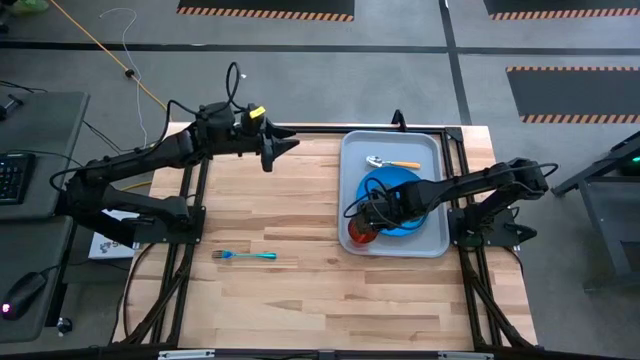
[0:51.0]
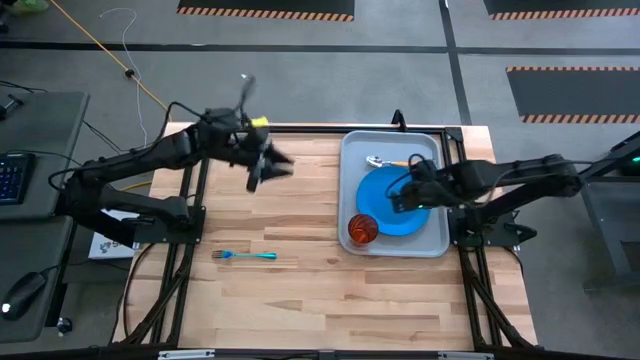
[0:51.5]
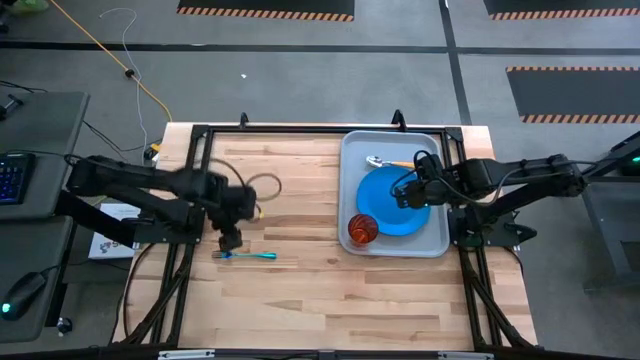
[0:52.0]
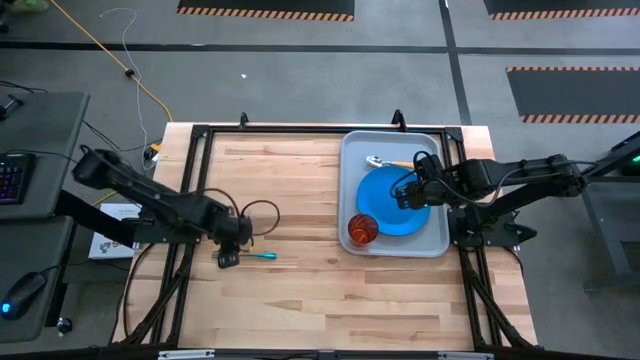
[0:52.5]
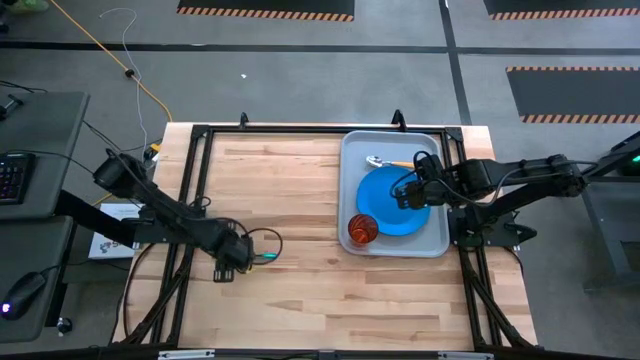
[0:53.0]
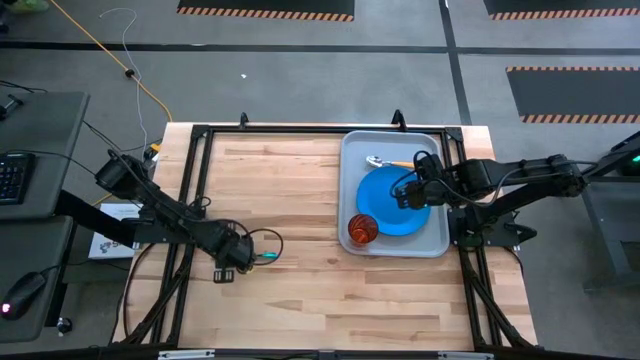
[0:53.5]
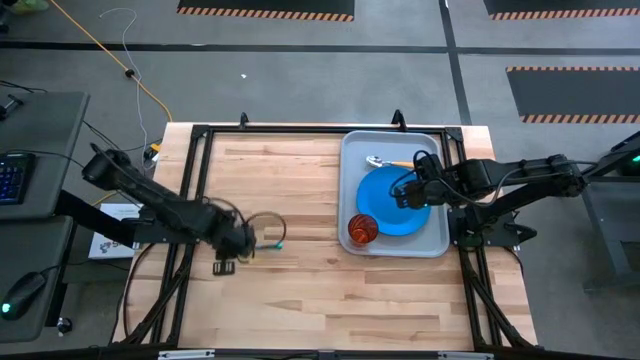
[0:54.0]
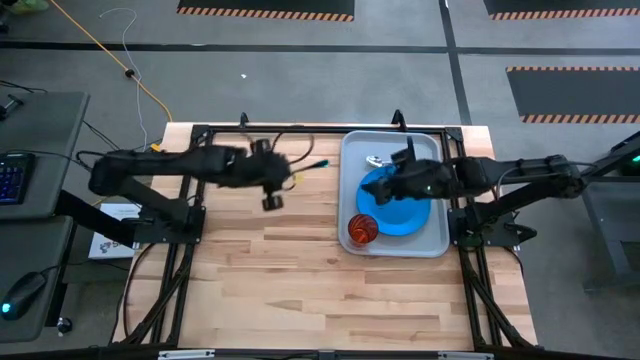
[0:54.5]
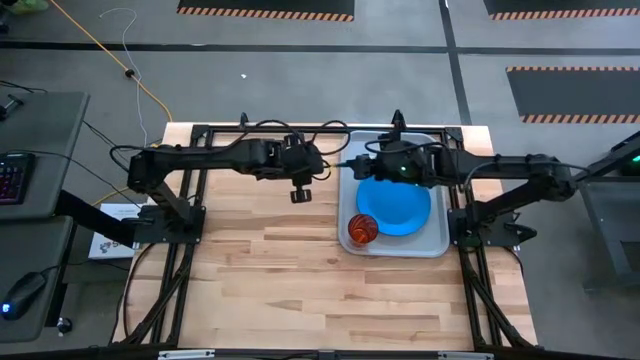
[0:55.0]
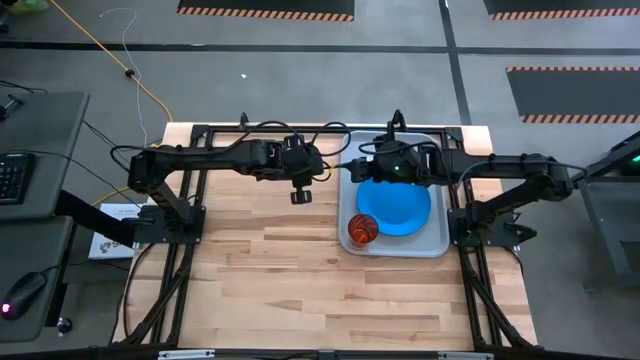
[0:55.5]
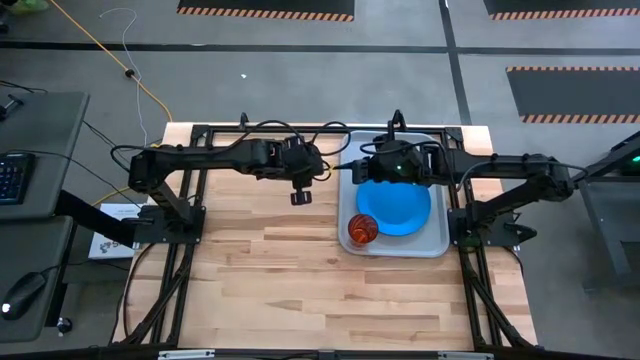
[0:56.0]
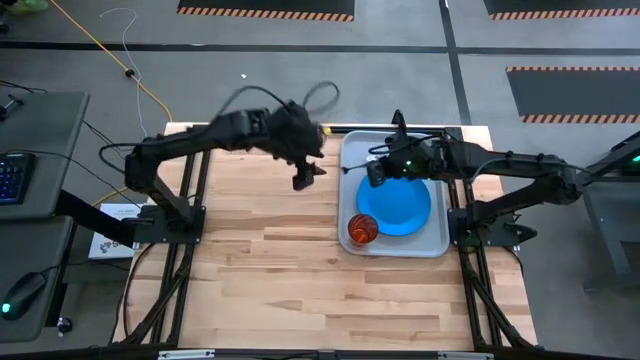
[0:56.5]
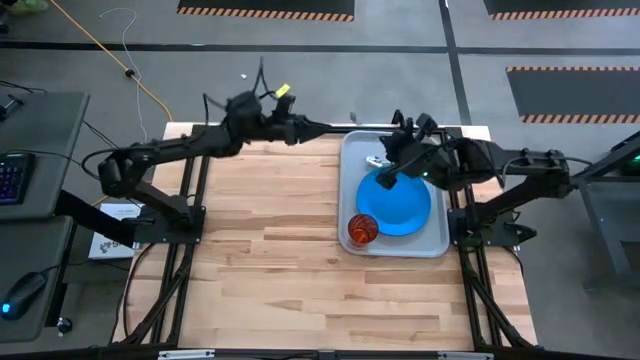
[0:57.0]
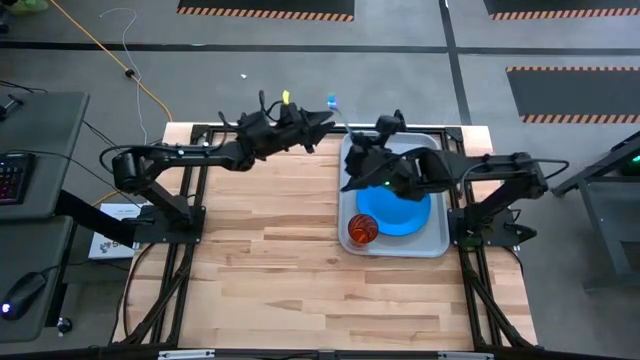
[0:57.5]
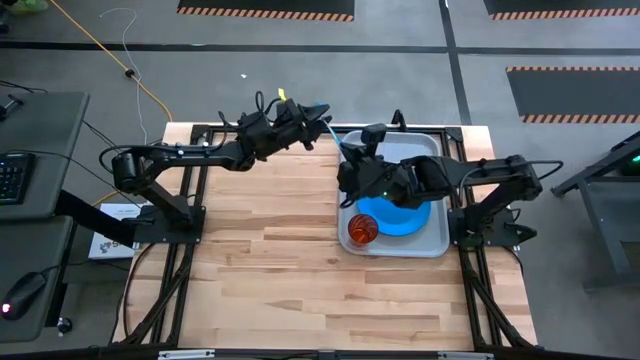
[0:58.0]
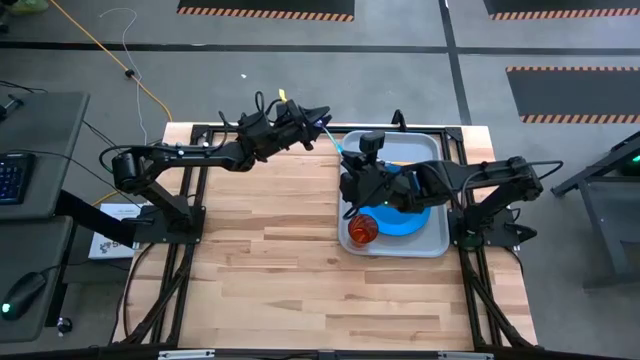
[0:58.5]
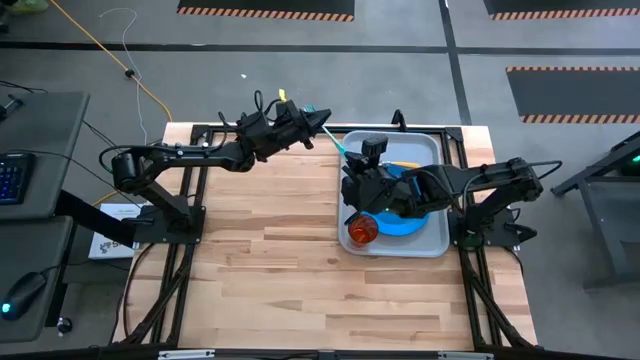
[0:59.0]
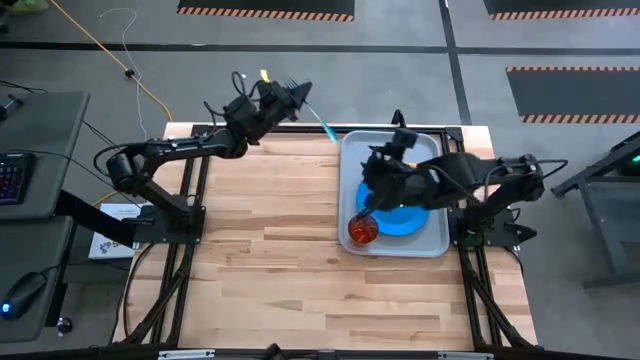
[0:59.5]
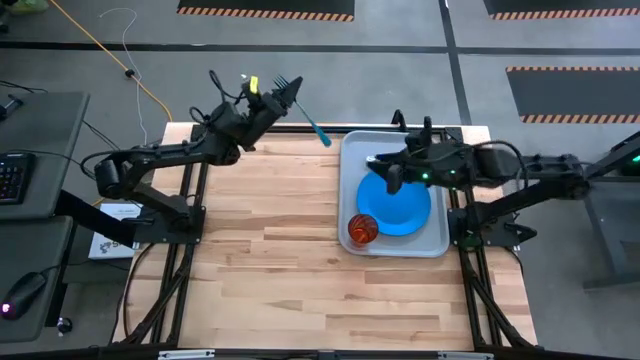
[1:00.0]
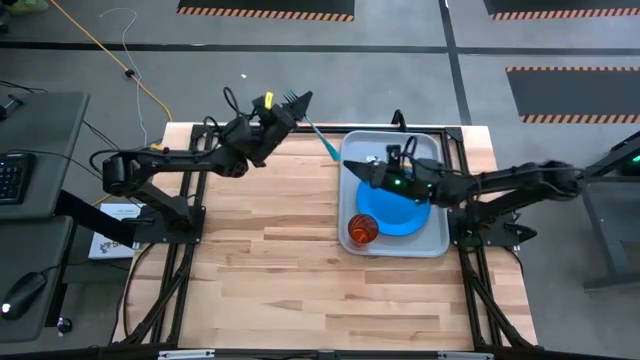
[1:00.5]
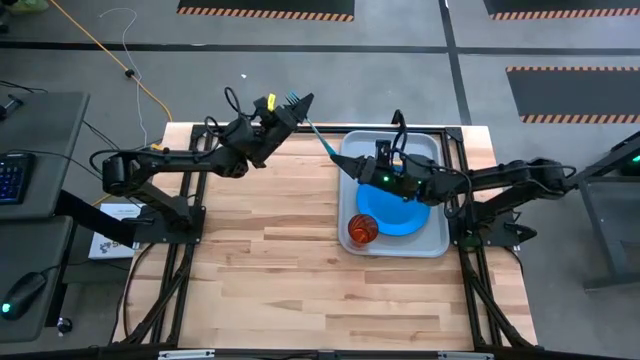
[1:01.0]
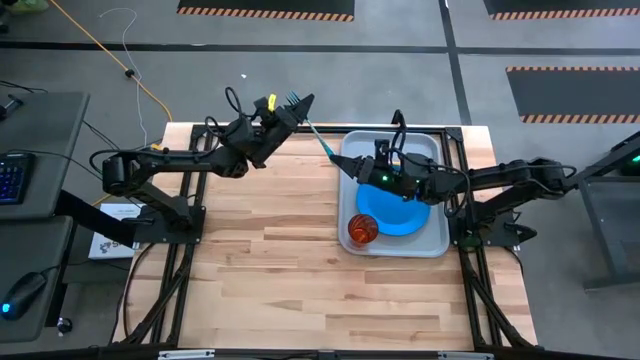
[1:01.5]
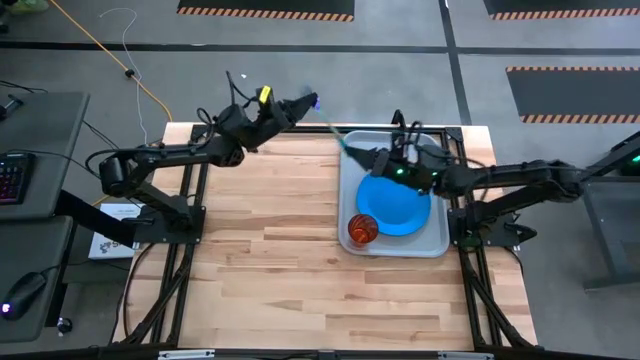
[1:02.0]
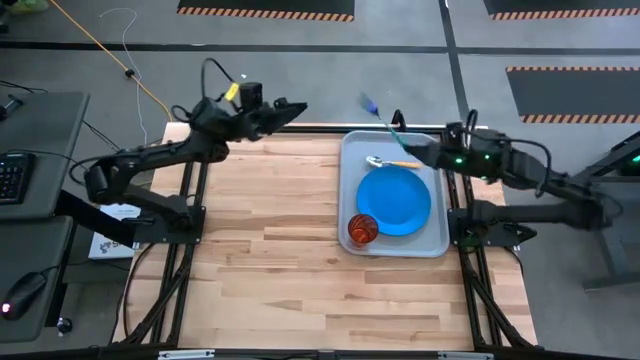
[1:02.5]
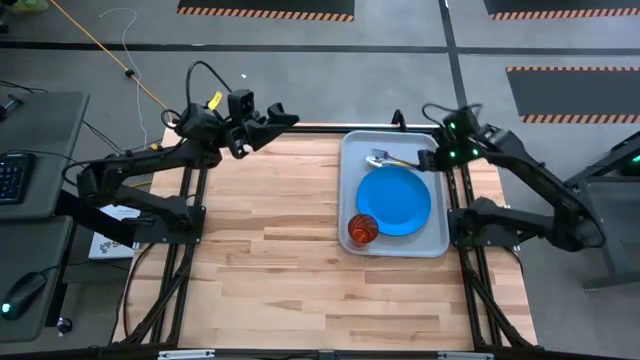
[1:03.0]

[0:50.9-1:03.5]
Task: Pick and place plate/cup/fork/spoon on tray
Put the blue fork to the right of the yellow spoon on the gray serving tray

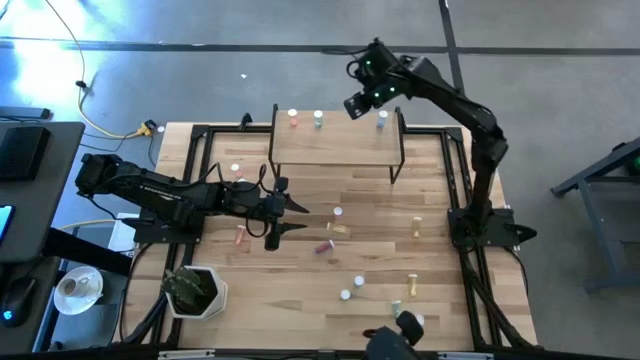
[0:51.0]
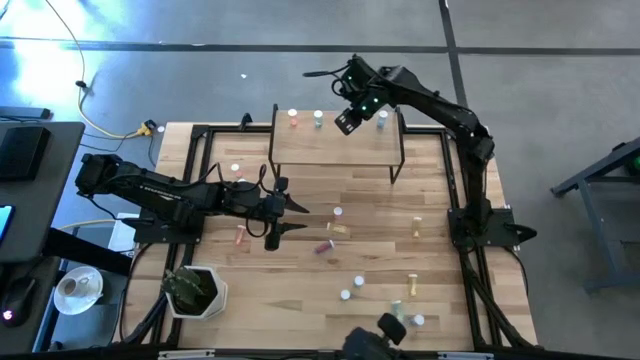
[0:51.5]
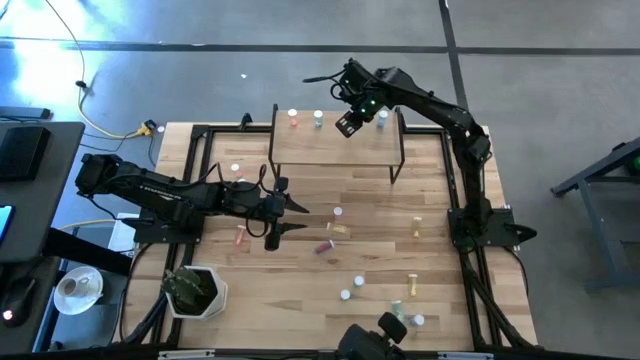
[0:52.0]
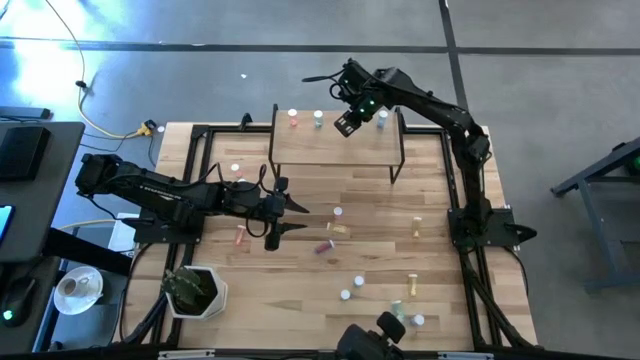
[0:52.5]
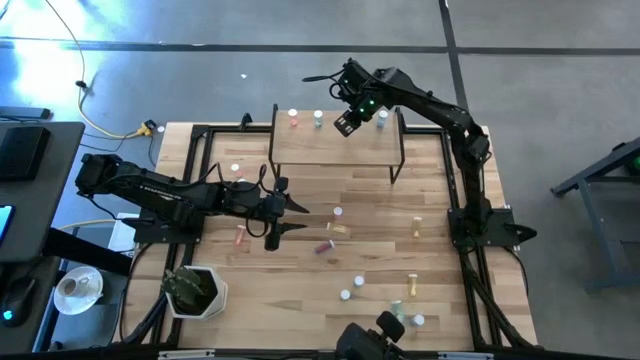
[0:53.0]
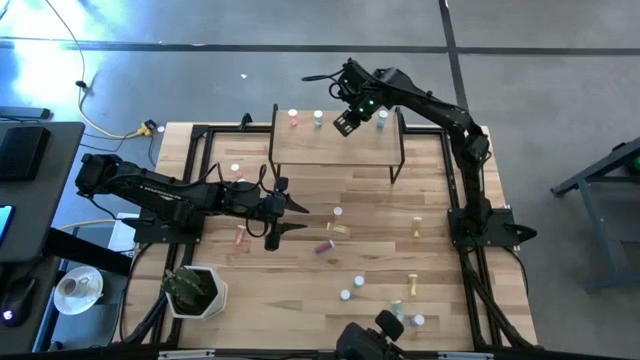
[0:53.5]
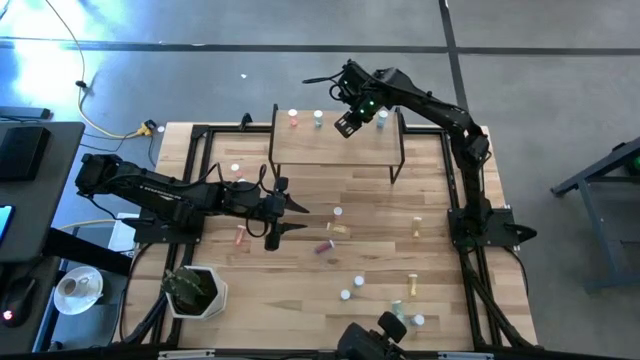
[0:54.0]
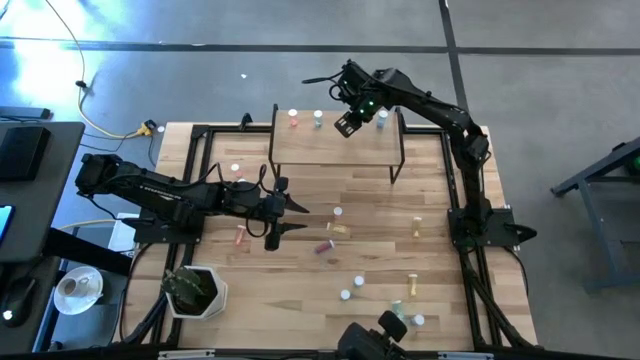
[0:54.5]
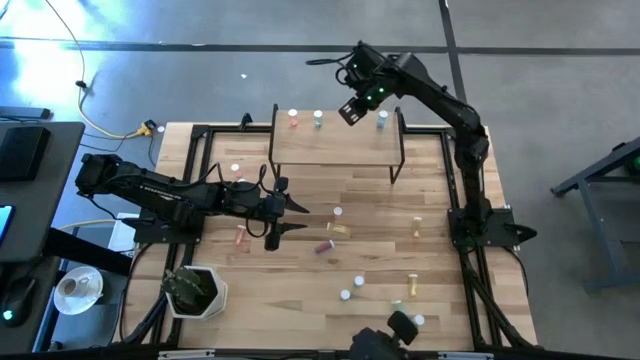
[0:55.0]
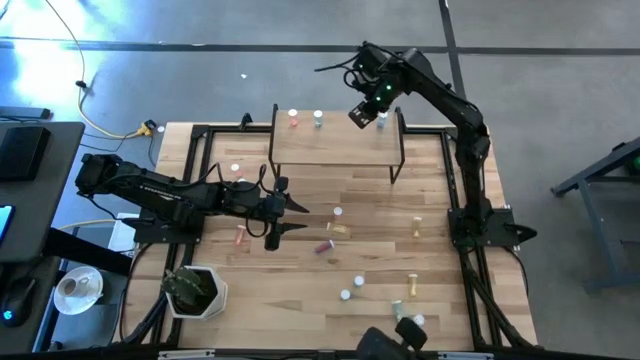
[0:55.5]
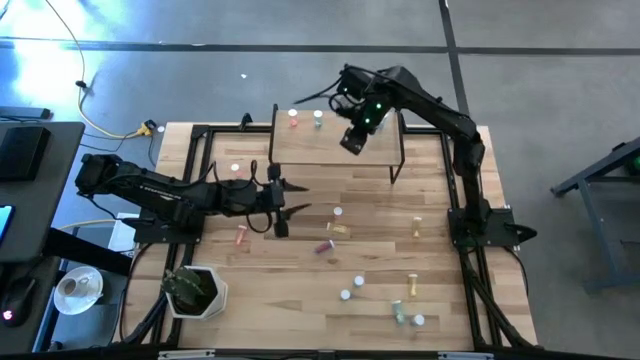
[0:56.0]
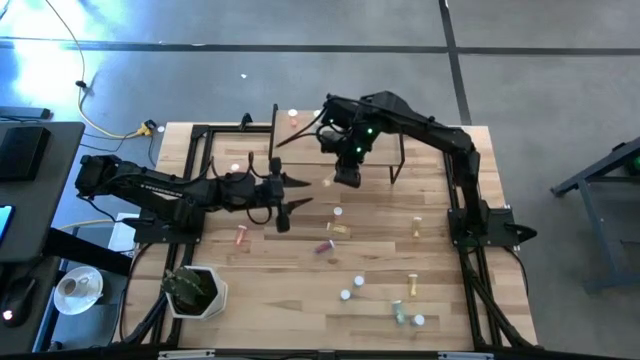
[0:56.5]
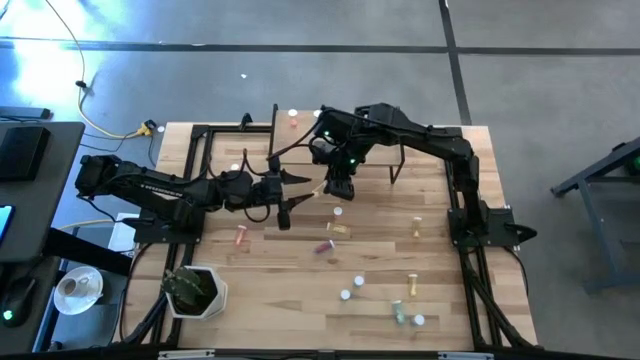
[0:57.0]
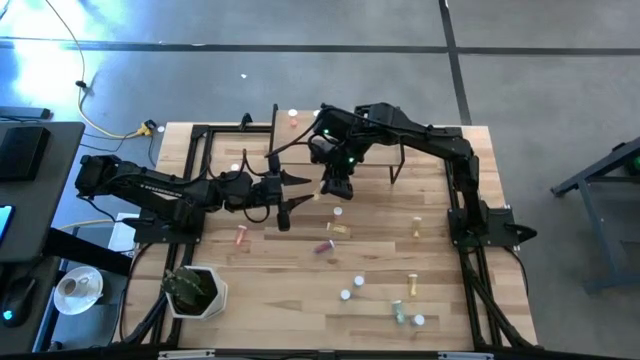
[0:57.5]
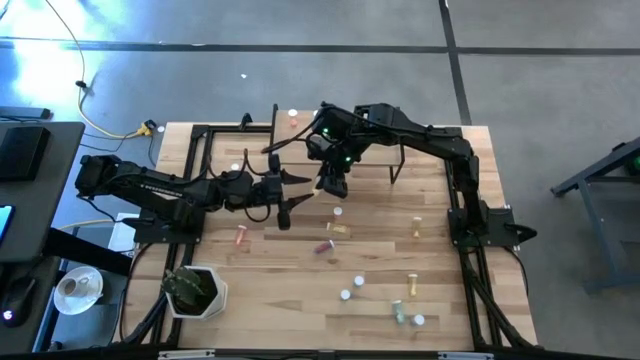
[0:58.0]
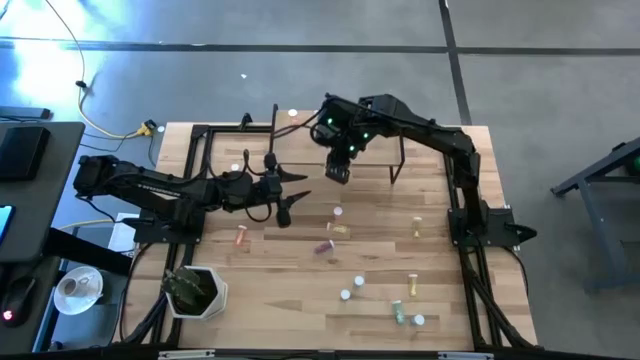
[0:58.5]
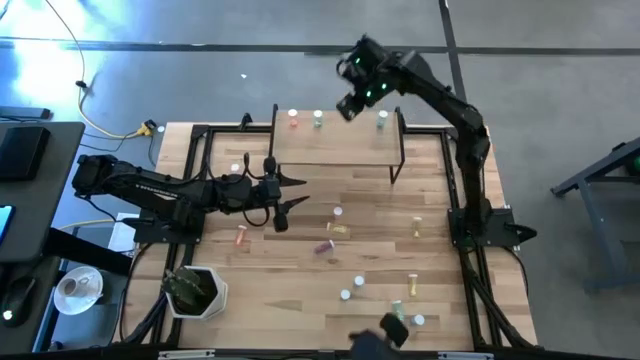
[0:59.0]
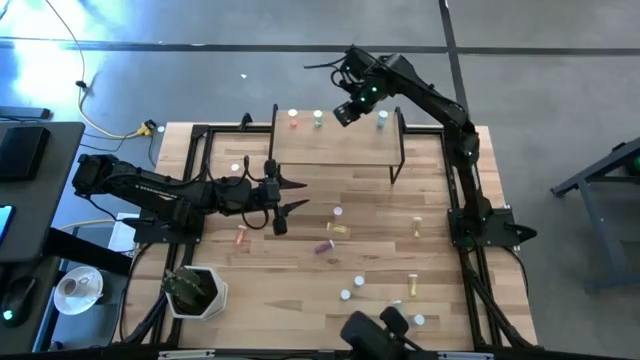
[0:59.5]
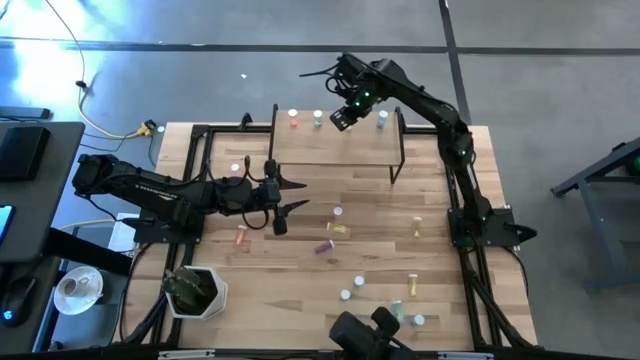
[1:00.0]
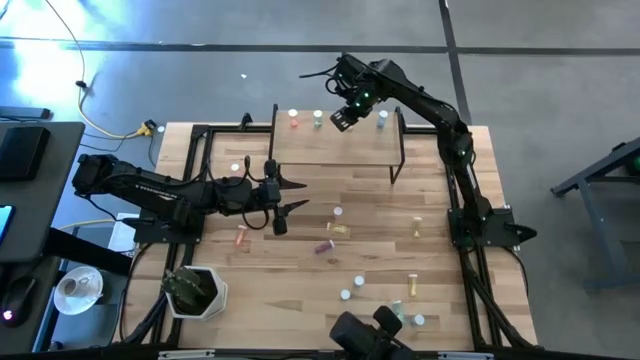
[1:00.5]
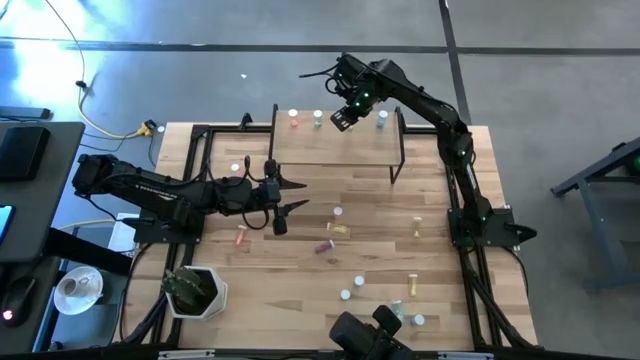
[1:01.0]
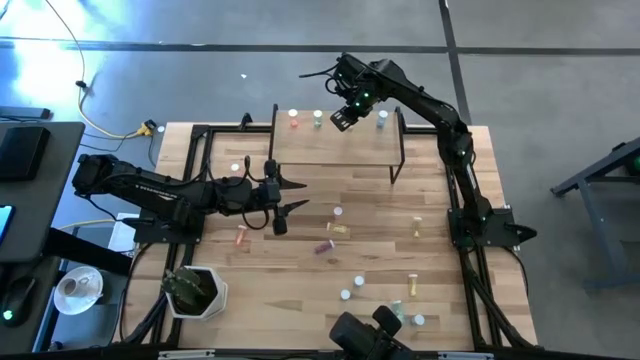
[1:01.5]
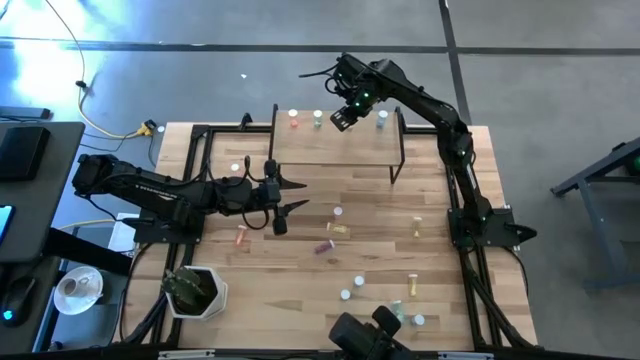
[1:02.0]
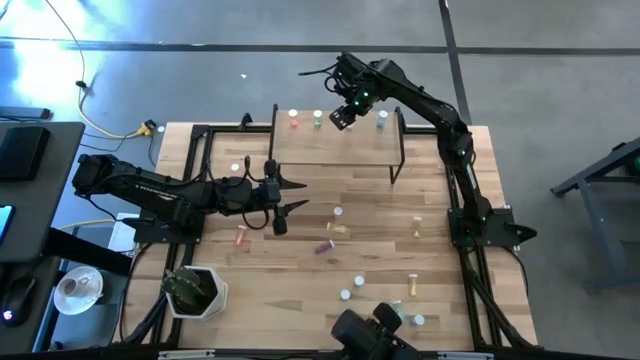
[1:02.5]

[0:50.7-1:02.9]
Task: Pick and place medicine bottles onto shelf by color
Put the yellow medicine bottle on the shelf
